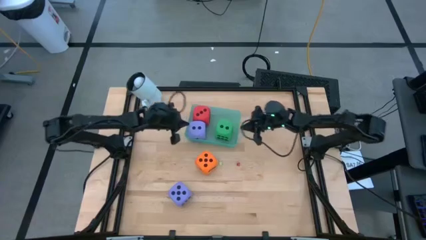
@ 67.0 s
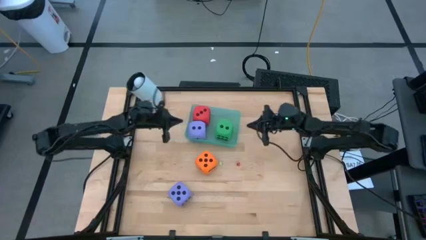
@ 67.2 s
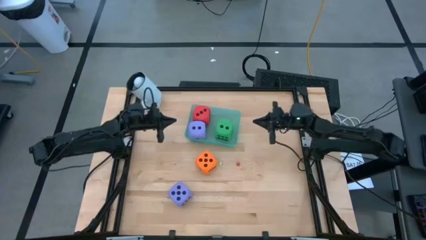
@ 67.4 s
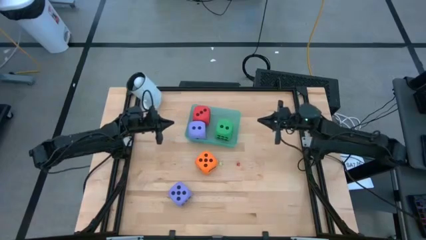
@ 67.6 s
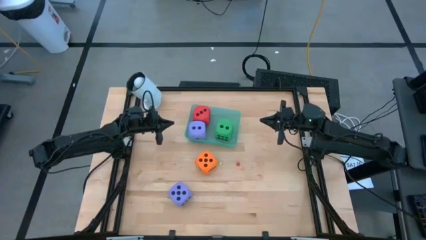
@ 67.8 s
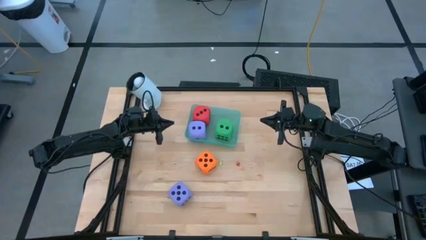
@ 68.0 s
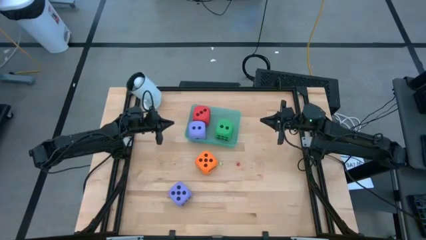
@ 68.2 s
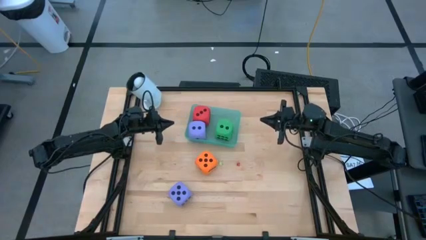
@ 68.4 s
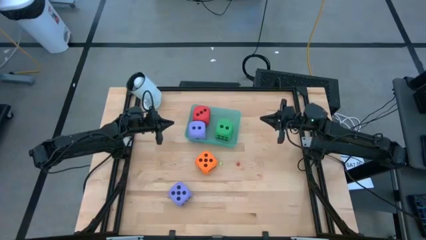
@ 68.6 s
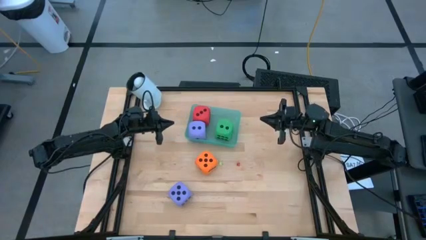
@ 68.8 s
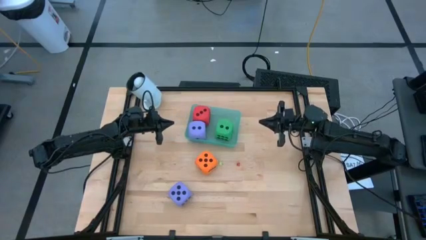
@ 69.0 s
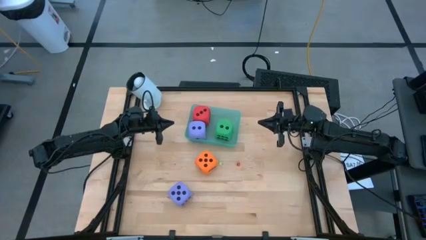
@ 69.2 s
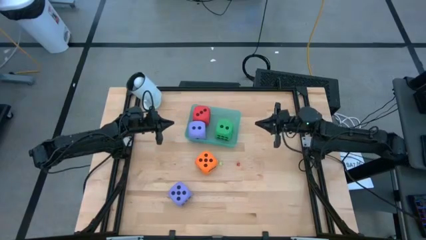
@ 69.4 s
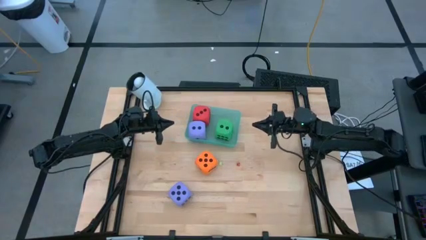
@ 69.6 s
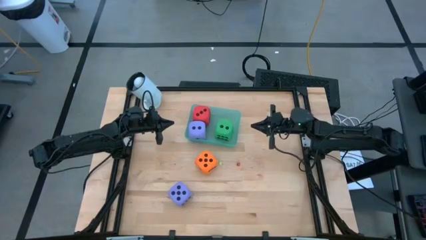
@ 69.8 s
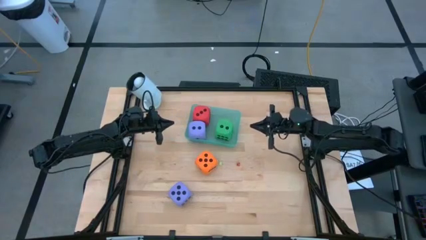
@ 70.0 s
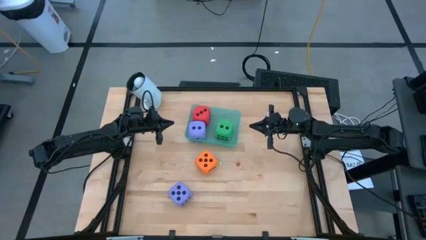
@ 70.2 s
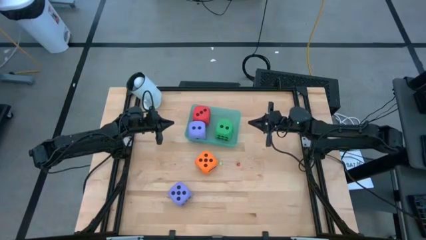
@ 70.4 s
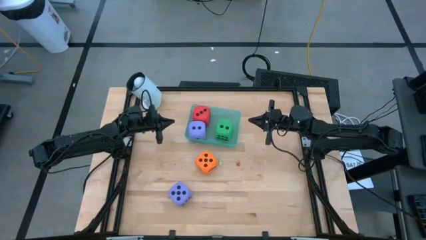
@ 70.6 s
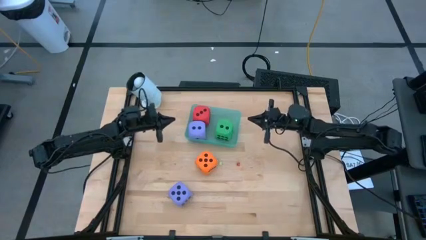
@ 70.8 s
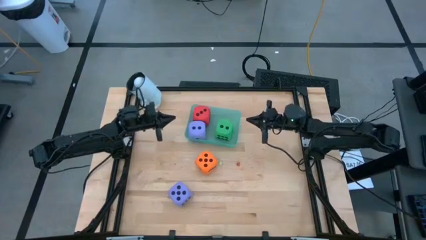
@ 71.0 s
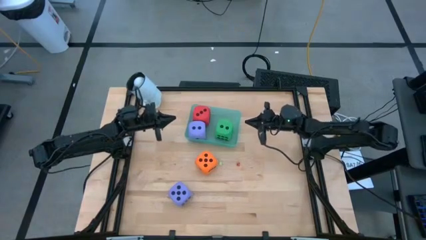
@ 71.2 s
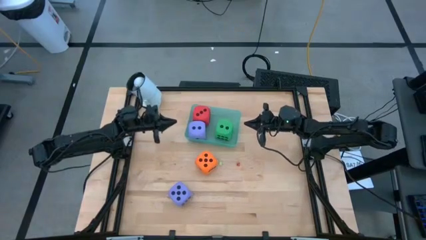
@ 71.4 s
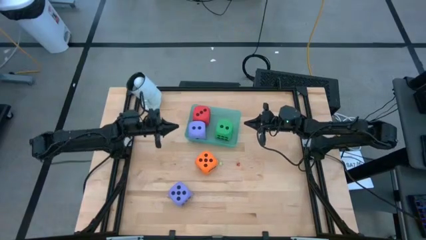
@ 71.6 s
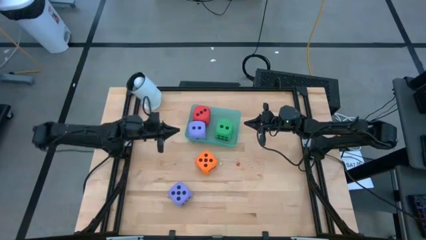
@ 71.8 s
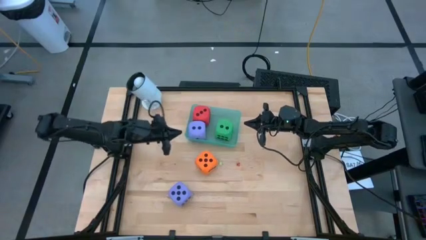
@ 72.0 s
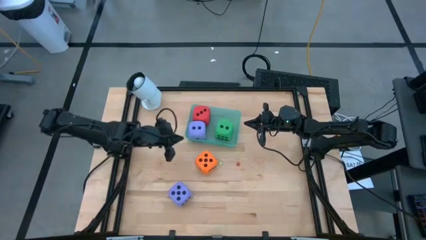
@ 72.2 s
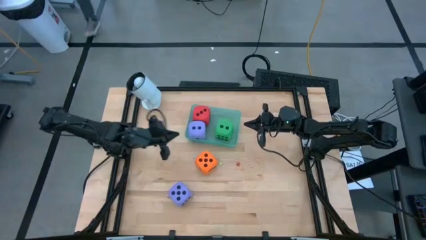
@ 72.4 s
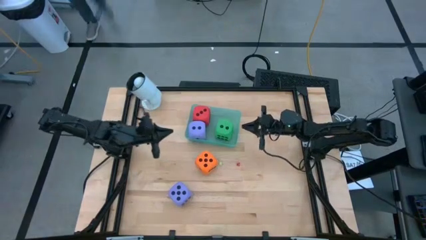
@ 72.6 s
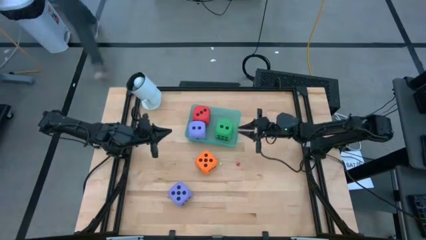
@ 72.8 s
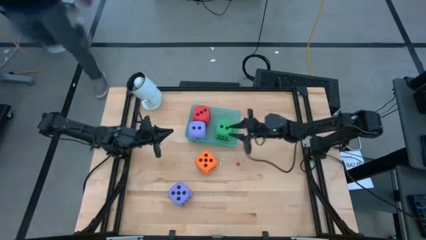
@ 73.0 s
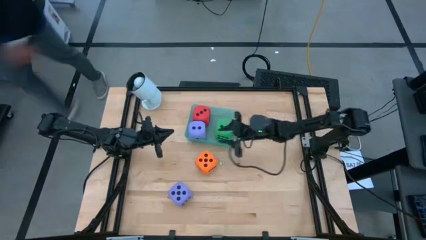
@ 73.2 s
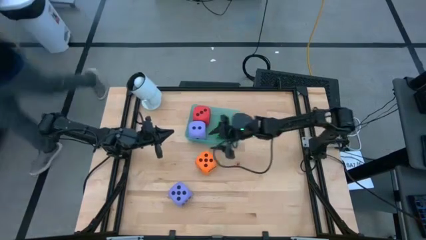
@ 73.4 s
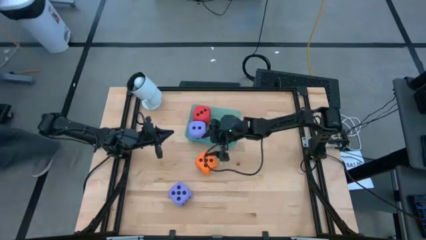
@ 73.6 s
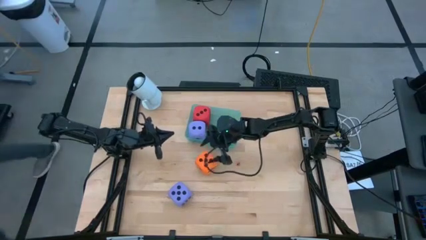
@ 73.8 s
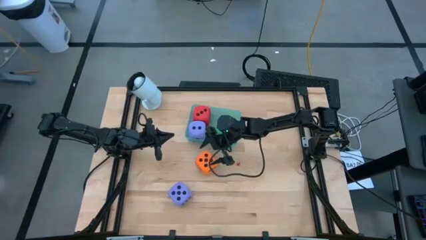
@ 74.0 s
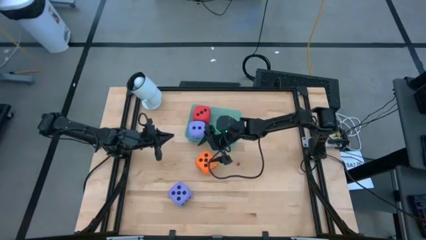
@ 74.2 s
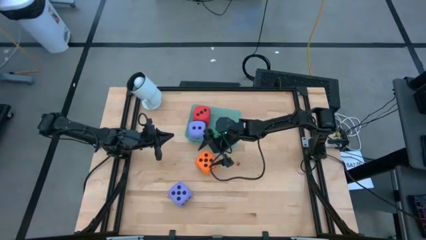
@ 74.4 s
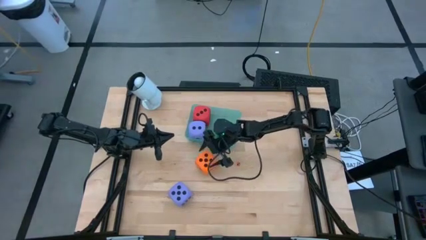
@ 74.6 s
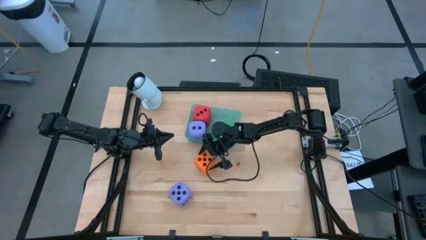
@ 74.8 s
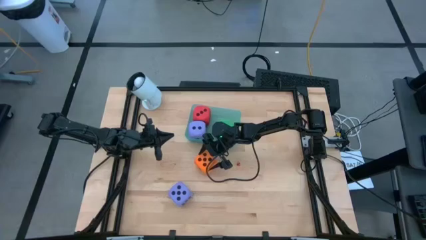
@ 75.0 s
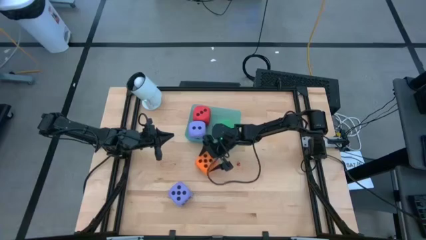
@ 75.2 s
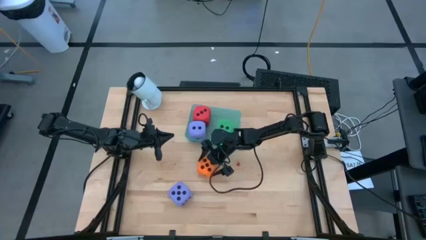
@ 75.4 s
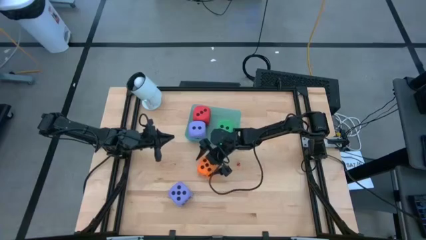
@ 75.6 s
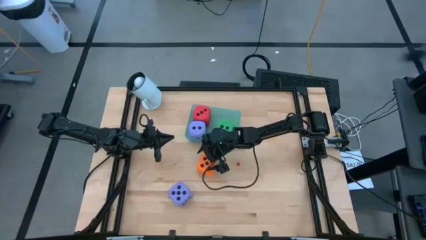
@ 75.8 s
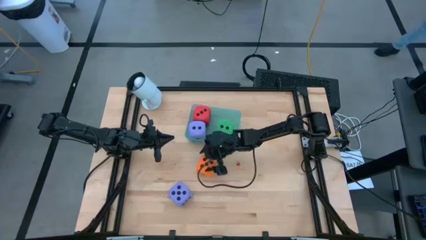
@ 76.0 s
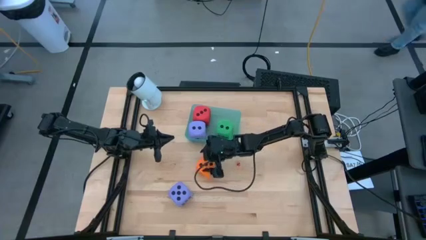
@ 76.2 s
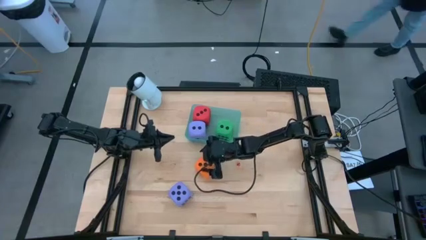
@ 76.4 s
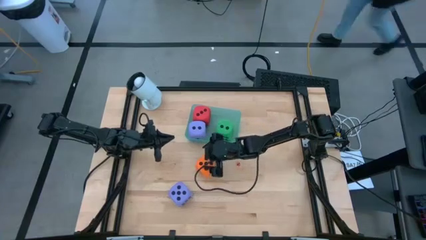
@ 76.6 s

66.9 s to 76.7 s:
Task: Pick & Place Dice
Put the large orange dice into the light blue bin

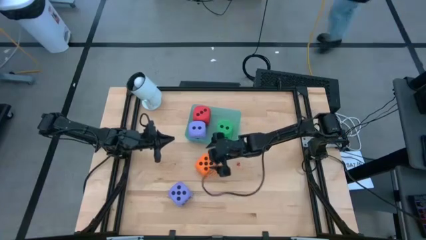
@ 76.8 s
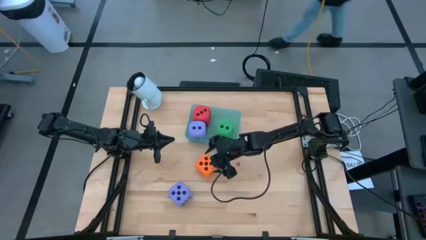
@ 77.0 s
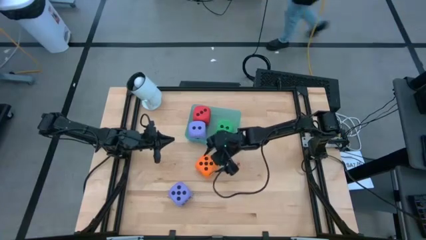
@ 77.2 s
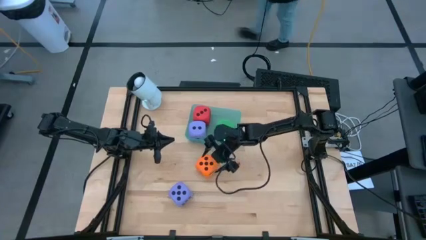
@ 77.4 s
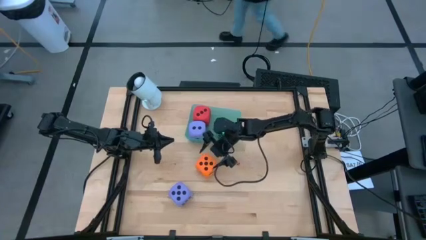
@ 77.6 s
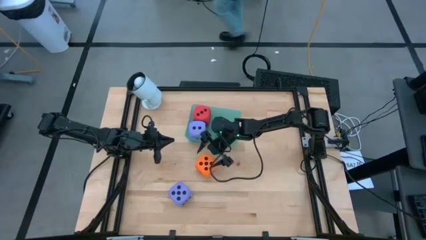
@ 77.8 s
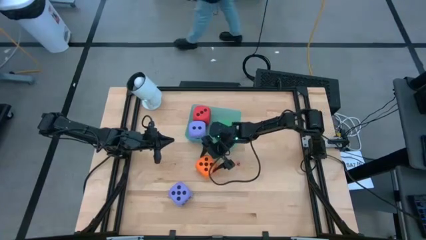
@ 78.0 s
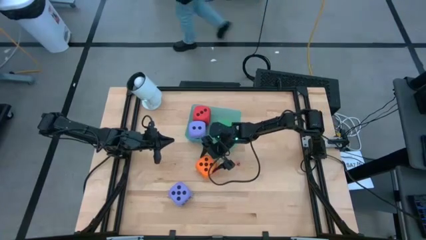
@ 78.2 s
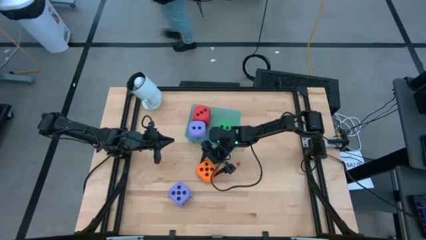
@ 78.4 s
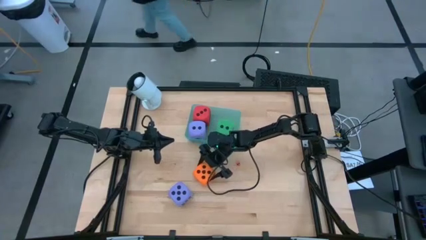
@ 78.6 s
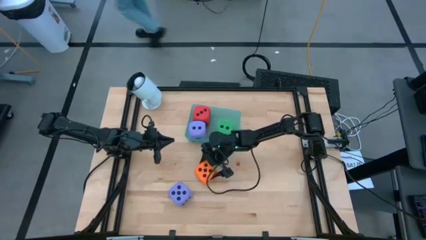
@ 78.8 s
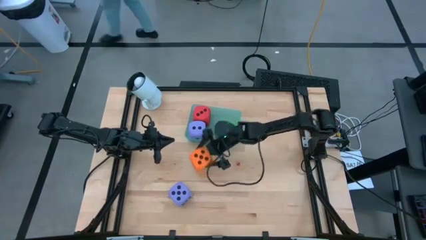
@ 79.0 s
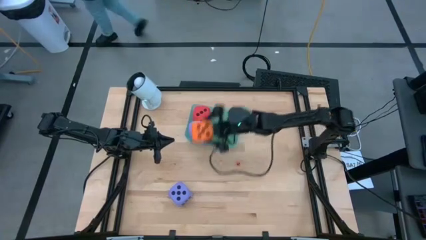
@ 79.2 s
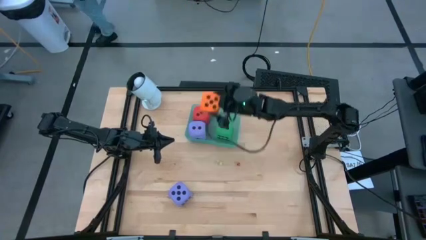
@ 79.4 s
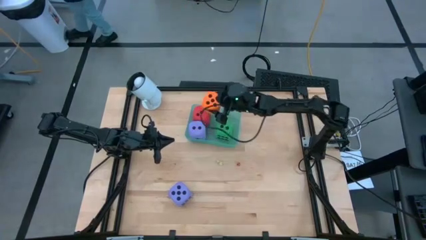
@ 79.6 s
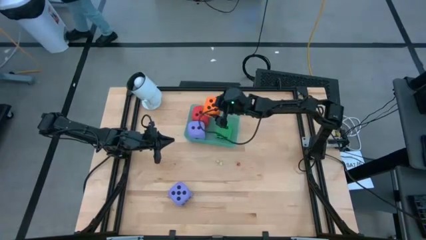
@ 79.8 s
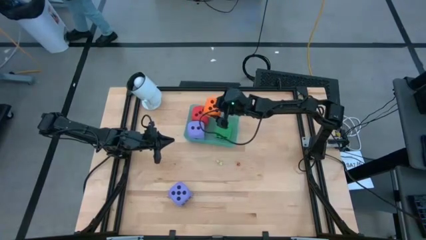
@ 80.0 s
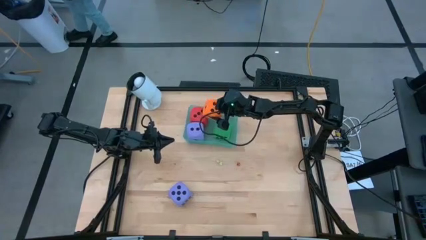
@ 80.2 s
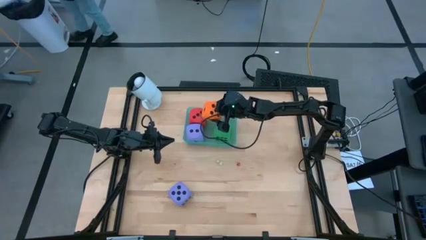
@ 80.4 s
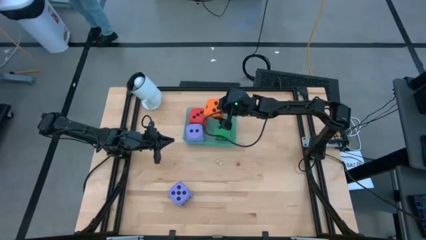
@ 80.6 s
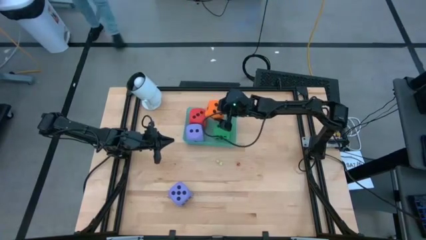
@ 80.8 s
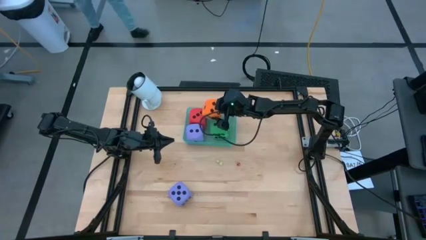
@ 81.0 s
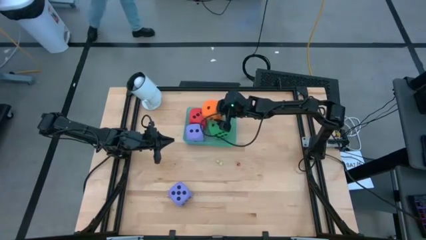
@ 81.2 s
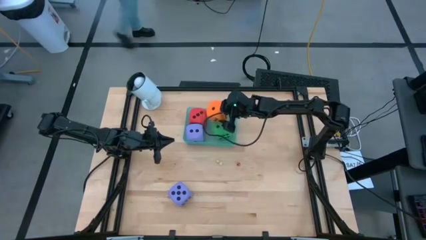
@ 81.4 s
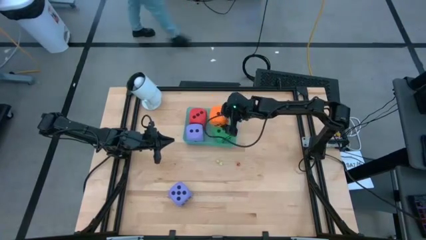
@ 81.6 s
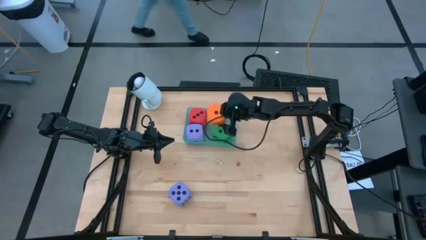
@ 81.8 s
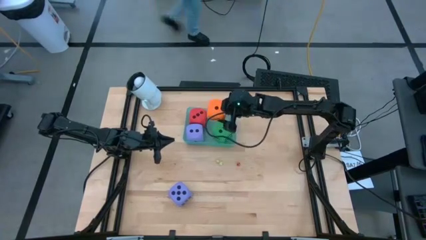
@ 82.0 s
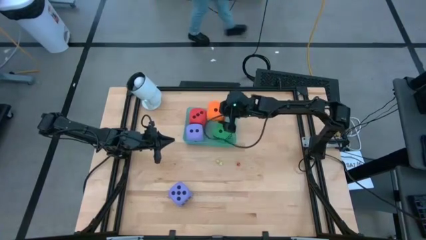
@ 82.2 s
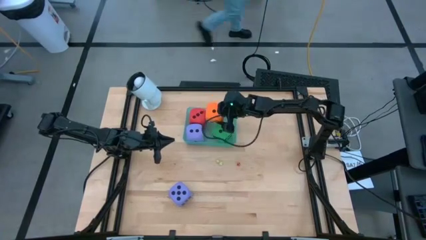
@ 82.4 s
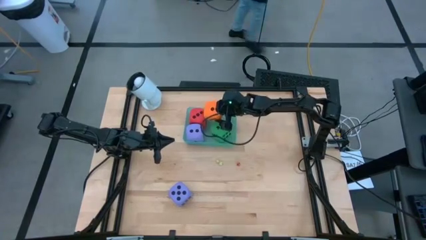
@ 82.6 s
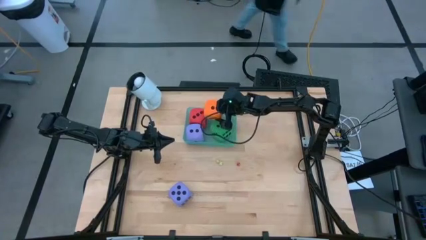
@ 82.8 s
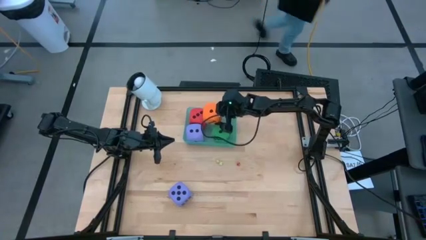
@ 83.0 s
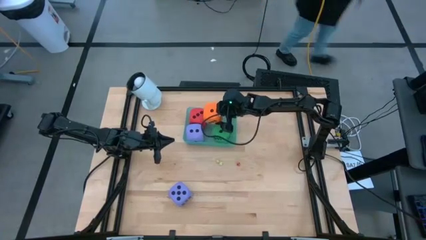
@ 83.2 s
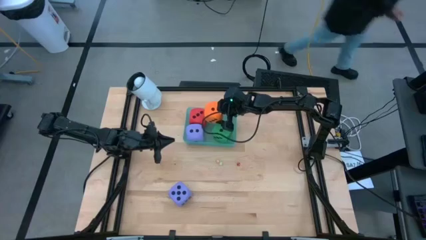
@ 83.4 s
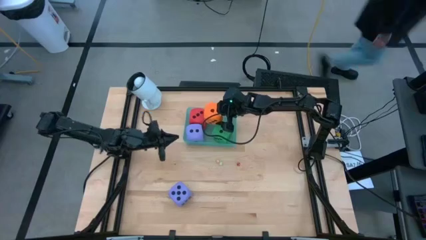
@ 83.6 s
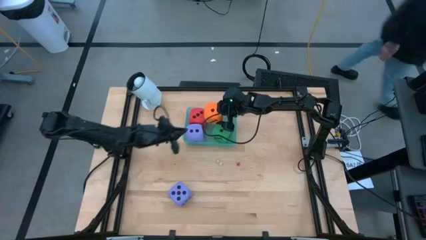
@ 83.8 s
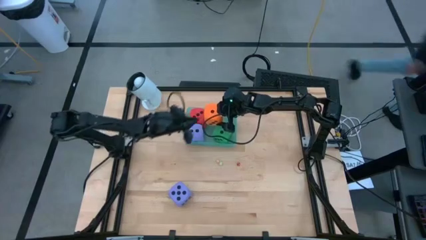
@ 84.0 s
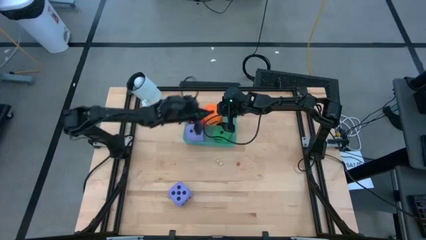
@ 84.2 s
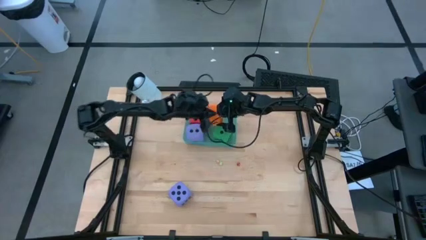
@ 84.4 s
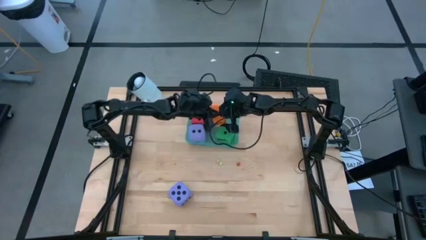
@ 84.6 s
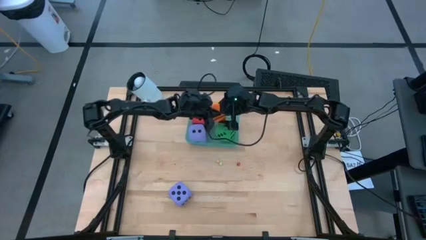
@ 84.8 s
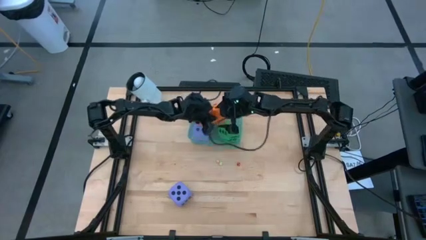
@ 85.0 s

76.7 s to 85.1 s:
Put the large orange dice into the light blue bin
